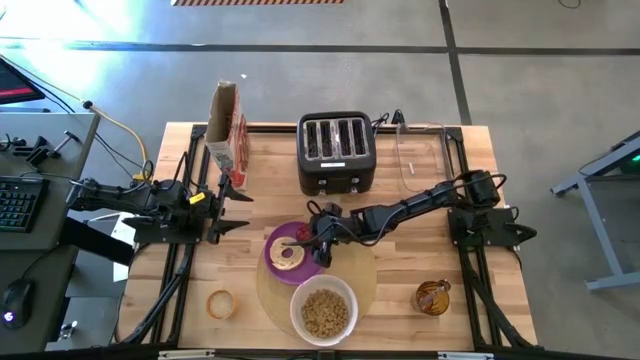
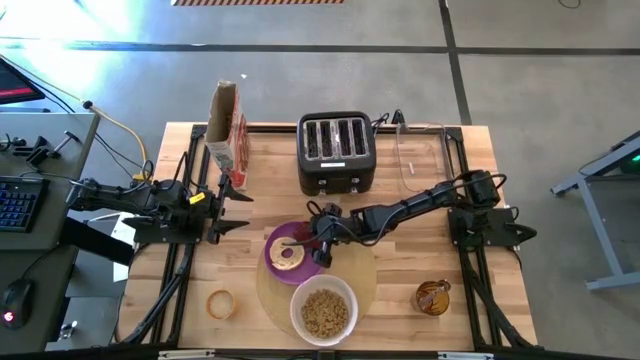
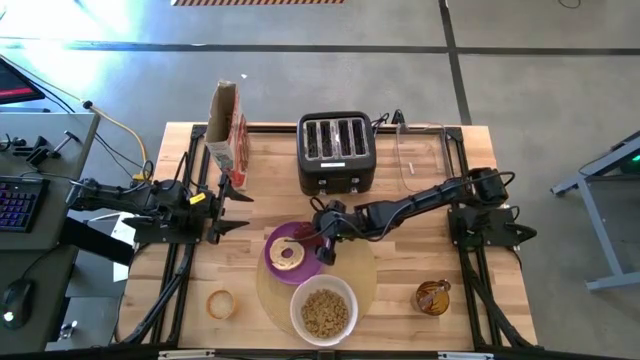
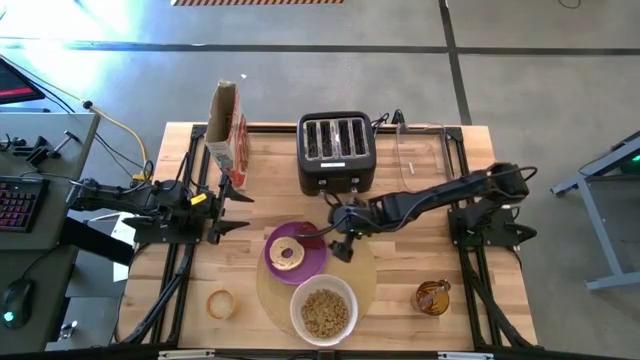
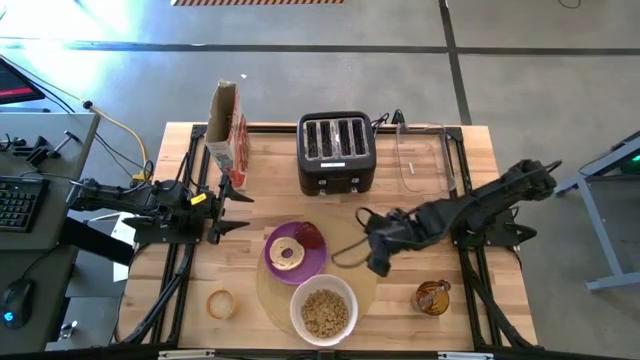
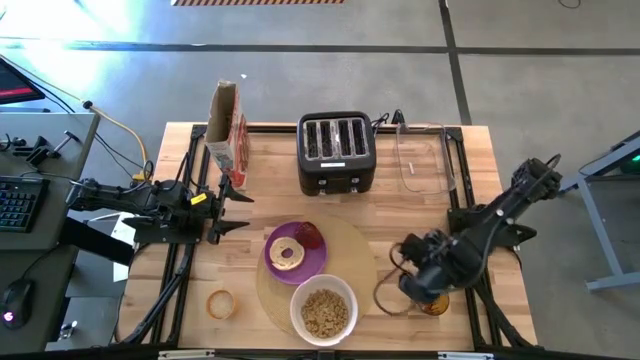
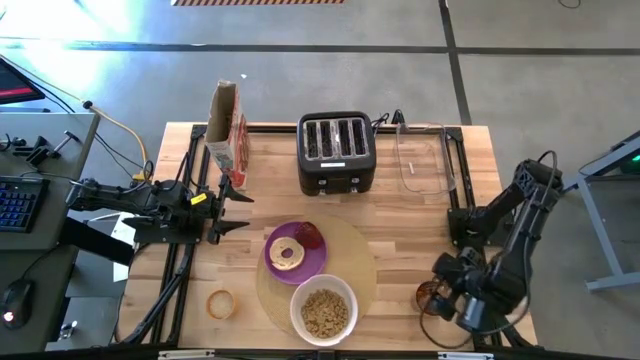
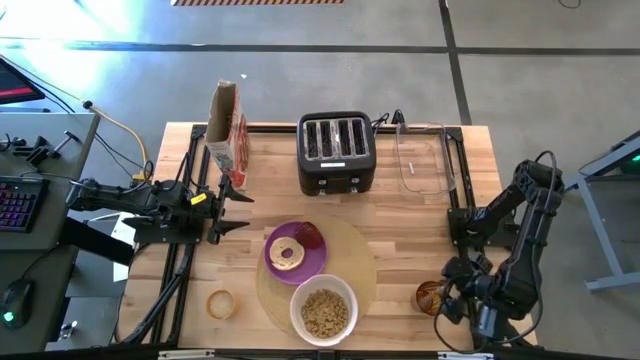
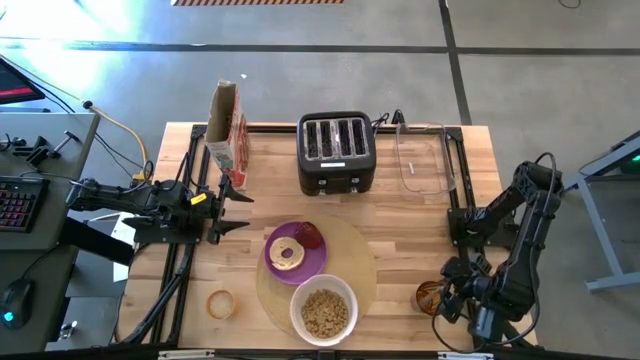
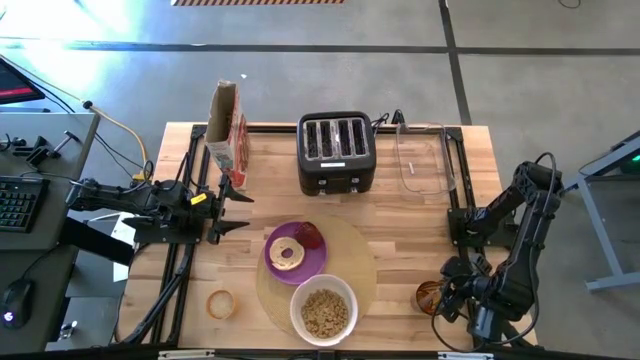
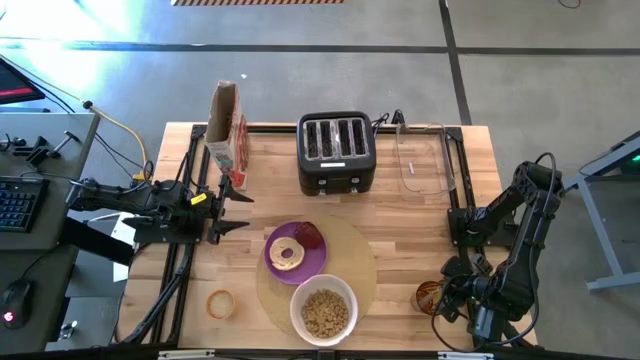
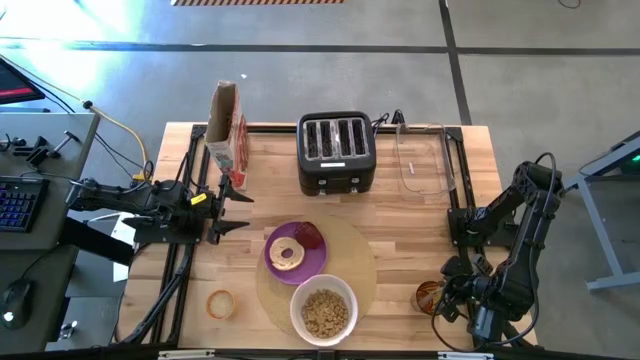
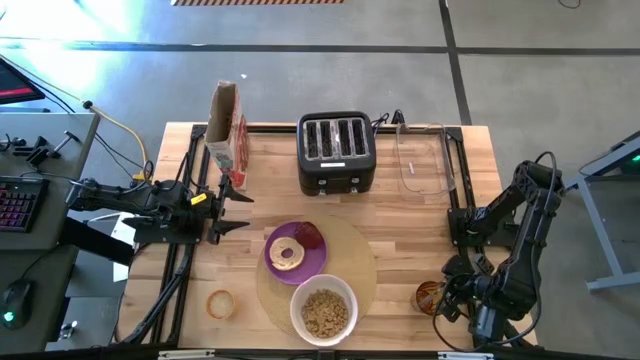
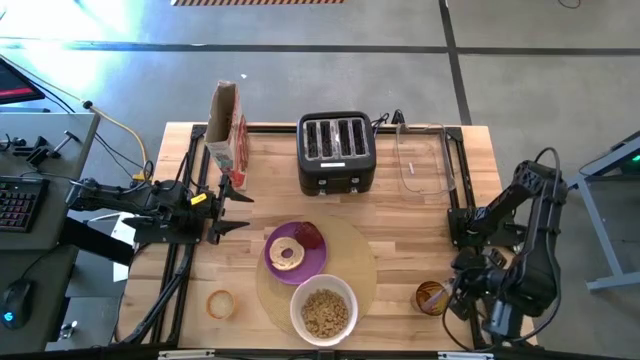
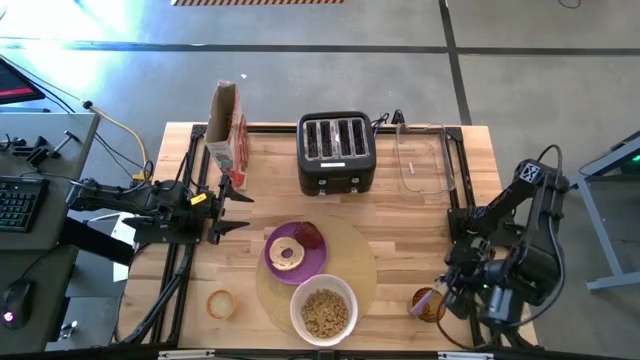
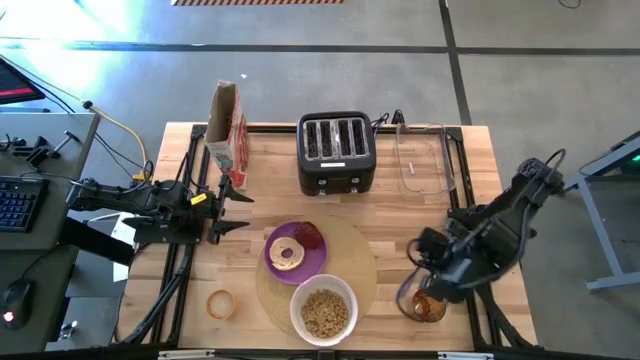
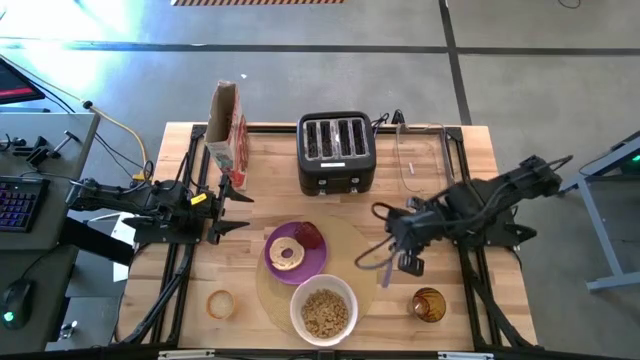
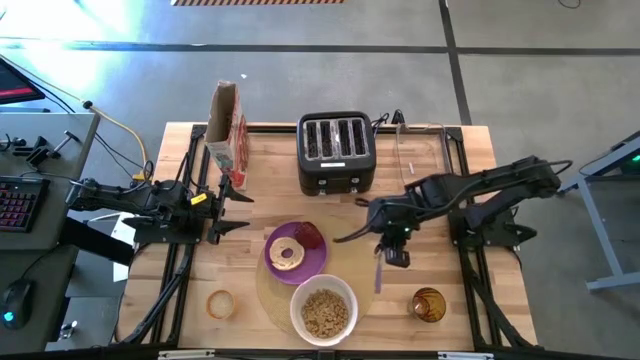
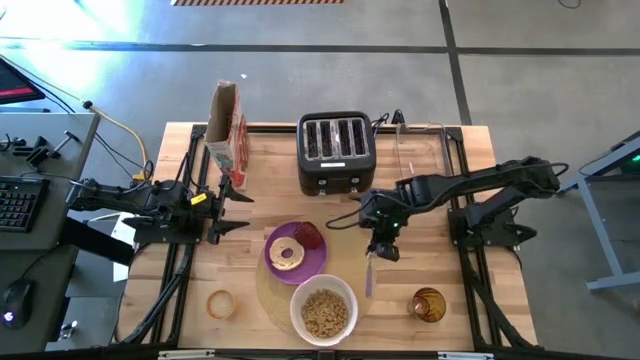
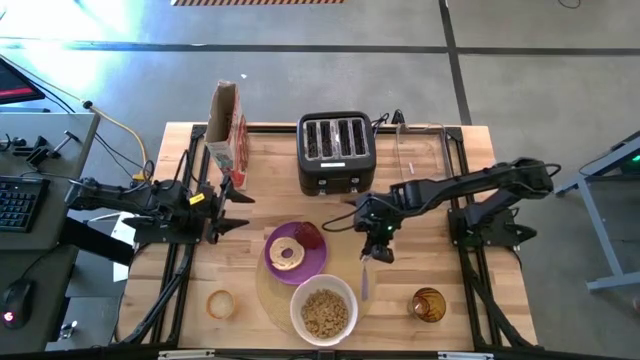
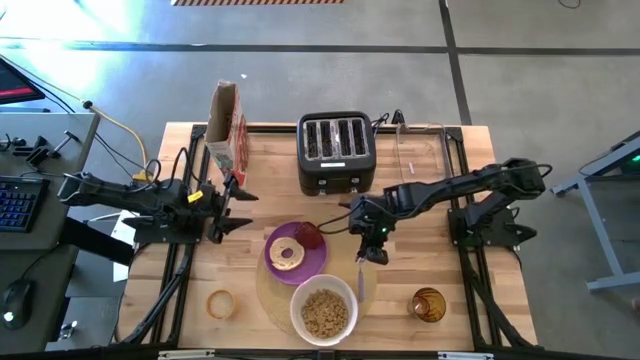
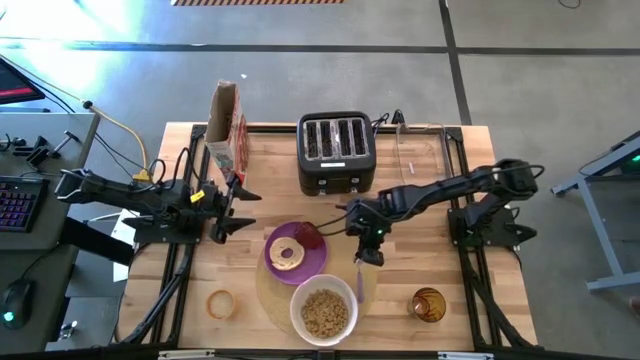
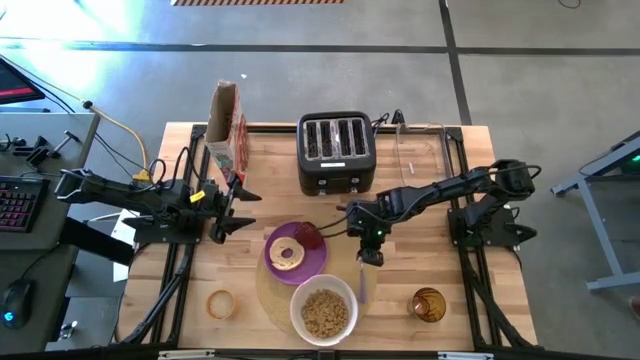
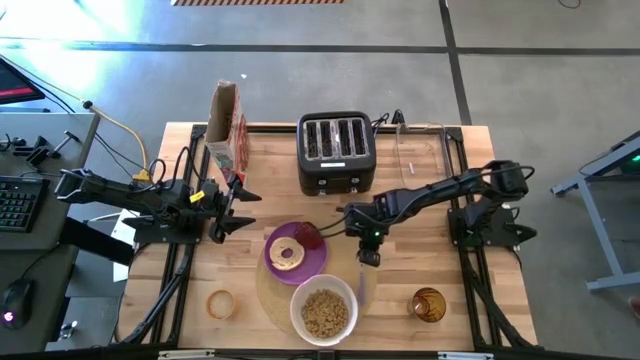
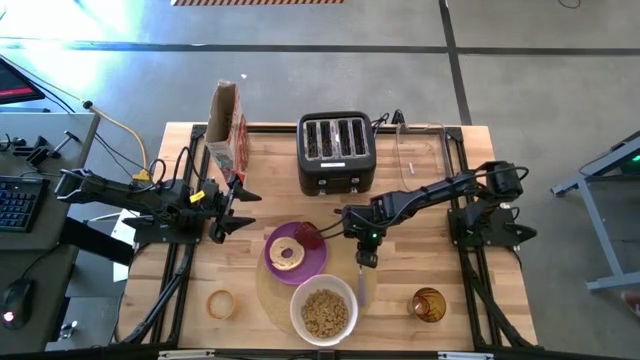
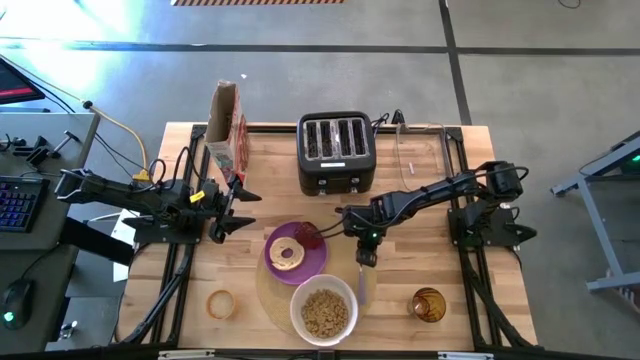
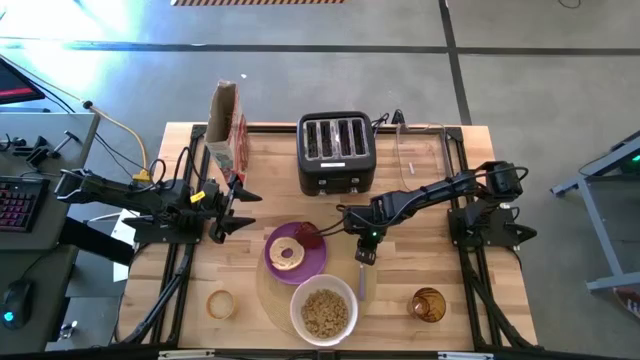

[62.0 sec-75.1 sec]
Task: Arrange a breakfast setting
Put the spoon on the right side of the table mat

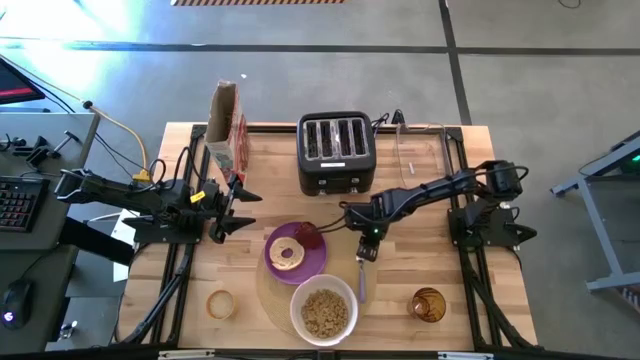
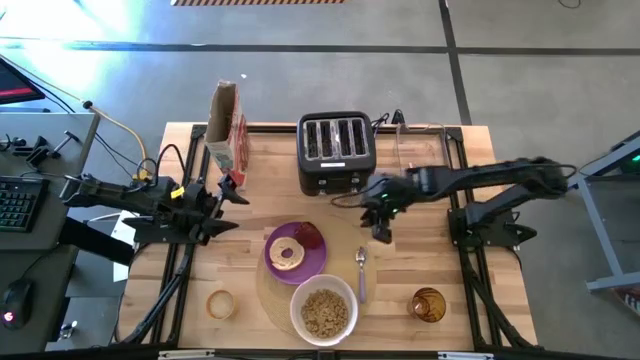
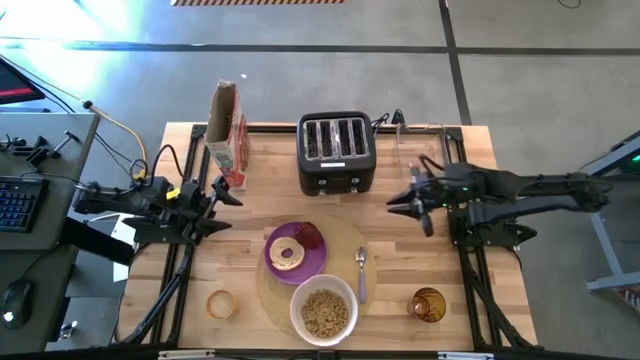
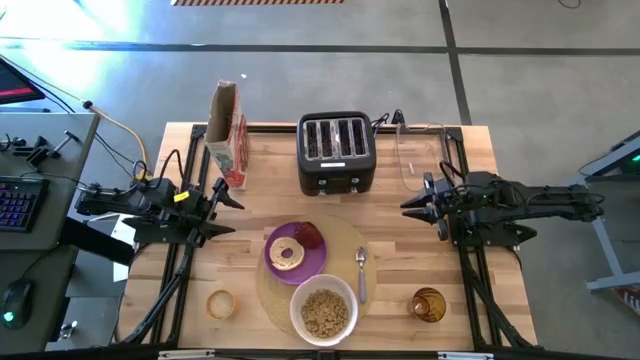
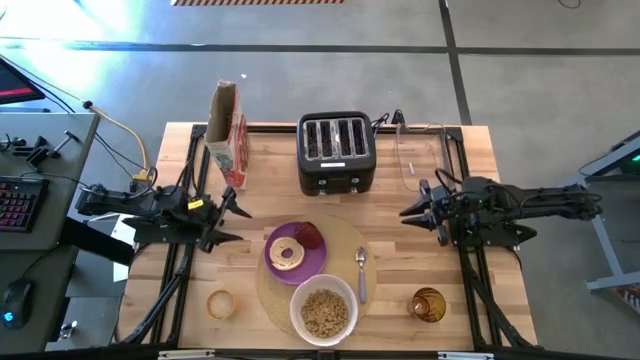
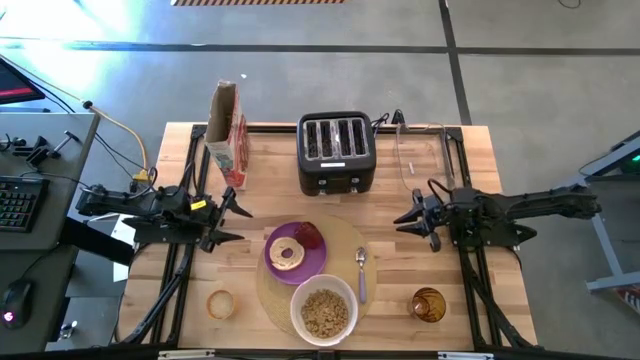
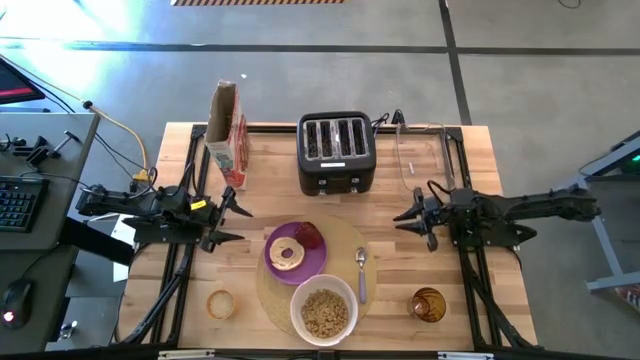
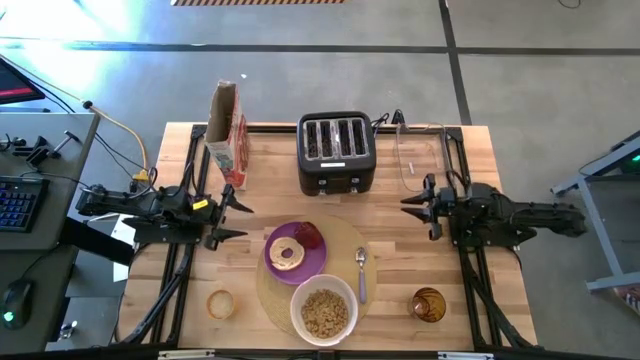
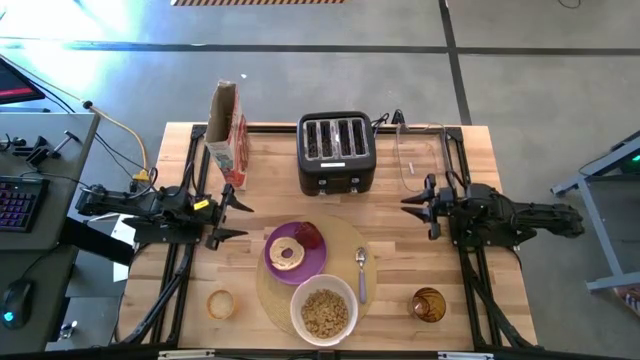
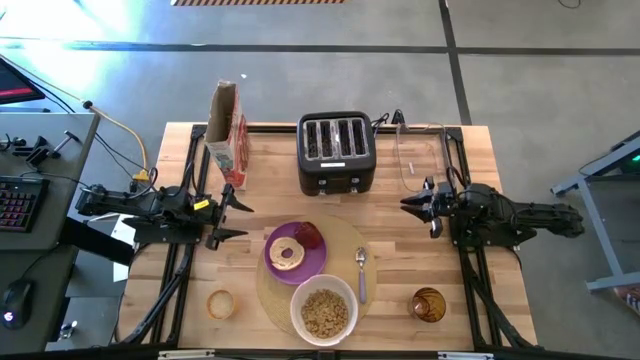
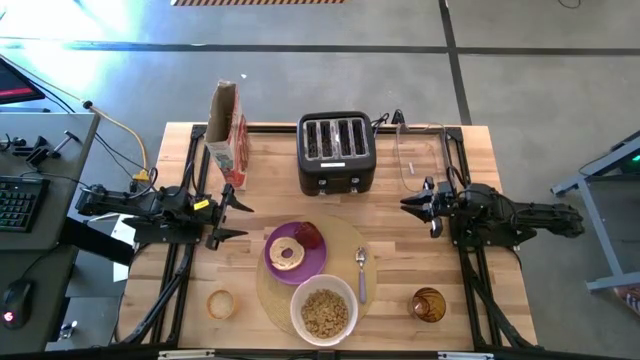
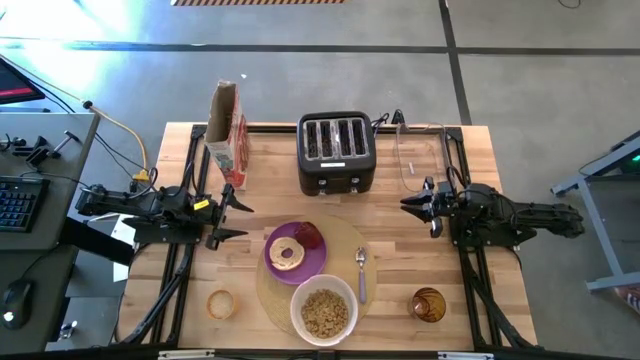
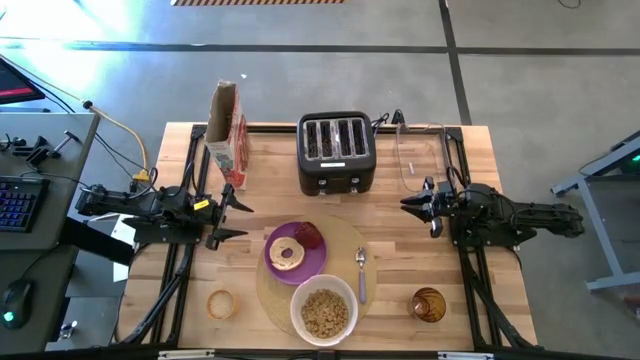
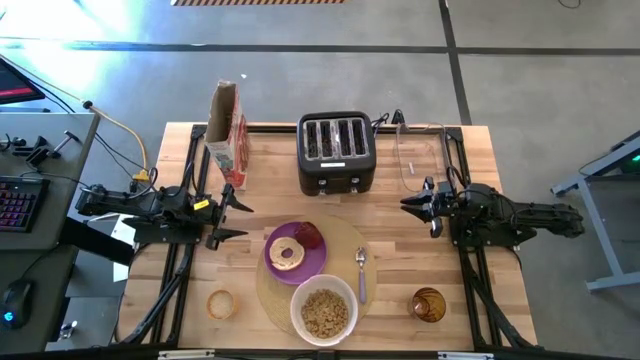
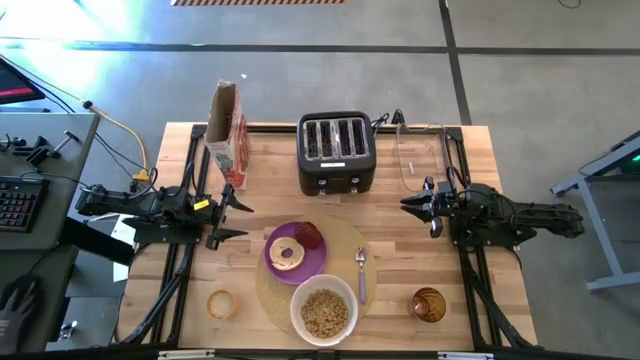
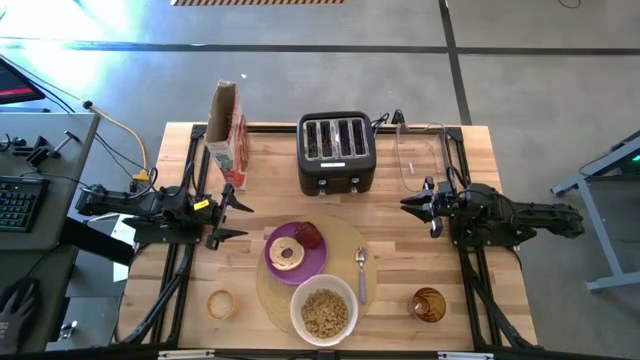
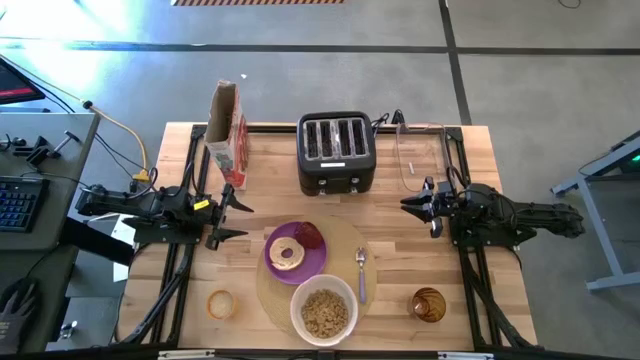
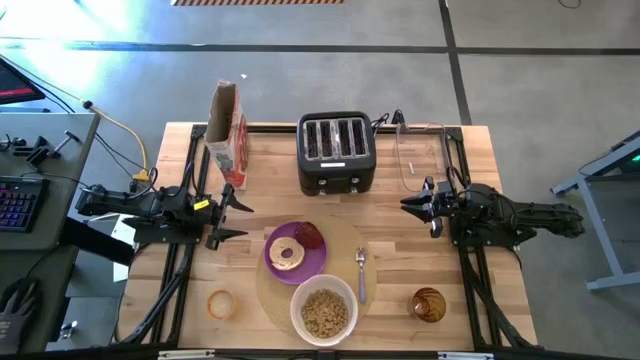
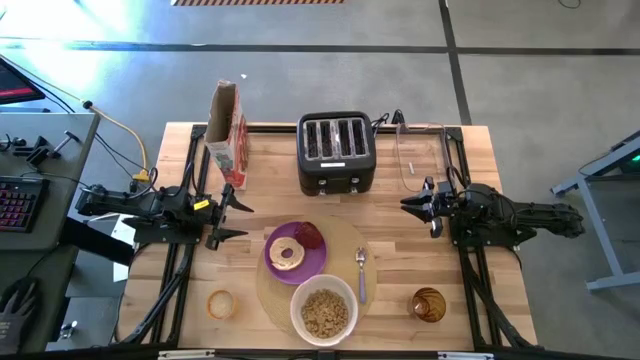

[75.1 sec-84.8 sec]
Return to Home Position
